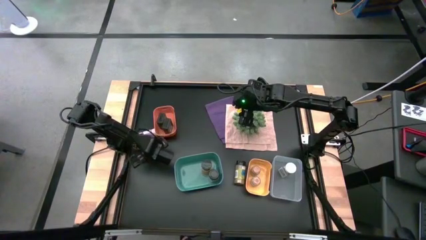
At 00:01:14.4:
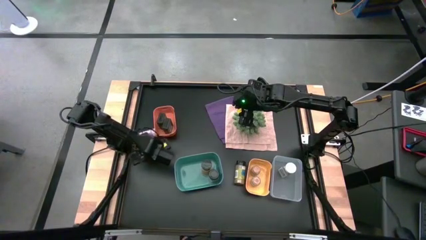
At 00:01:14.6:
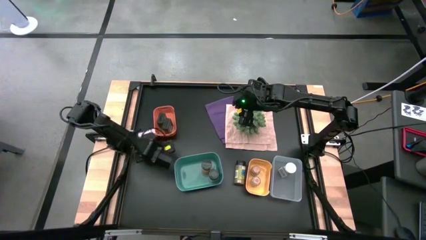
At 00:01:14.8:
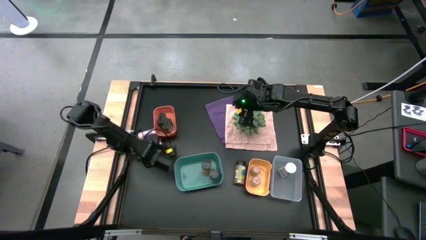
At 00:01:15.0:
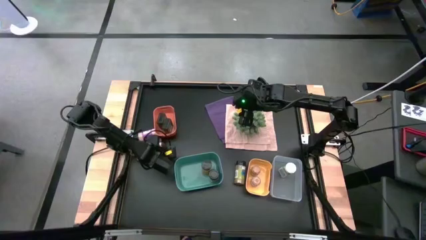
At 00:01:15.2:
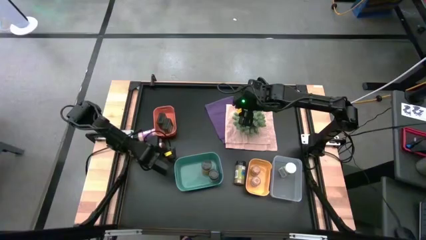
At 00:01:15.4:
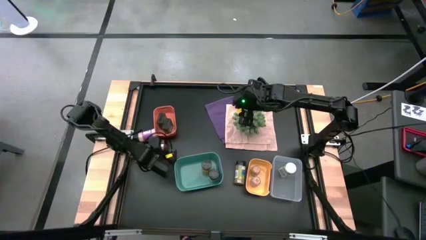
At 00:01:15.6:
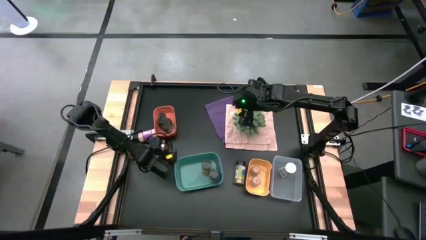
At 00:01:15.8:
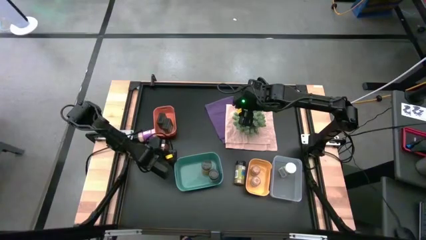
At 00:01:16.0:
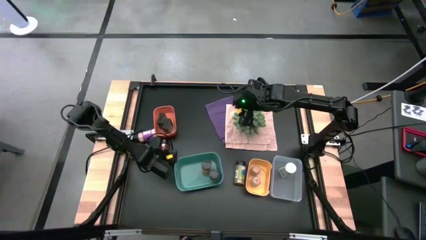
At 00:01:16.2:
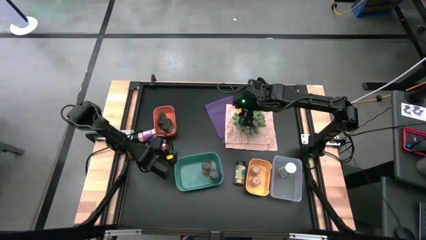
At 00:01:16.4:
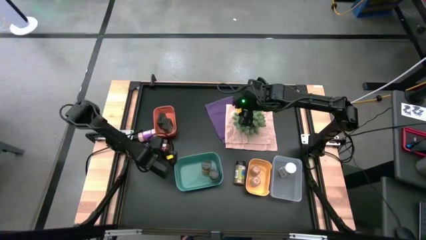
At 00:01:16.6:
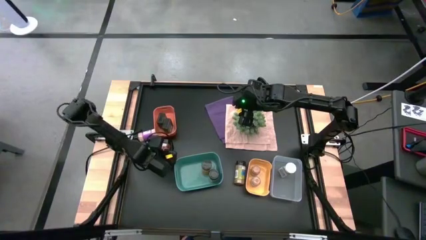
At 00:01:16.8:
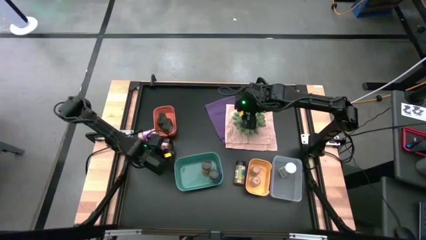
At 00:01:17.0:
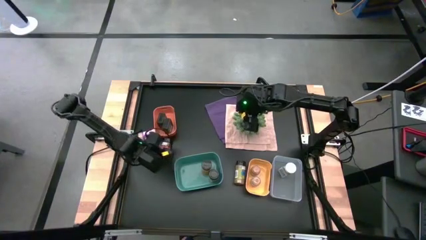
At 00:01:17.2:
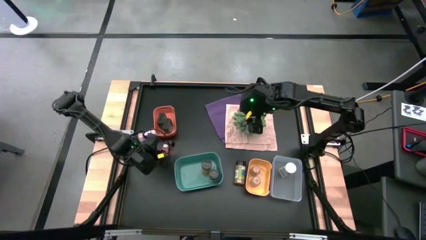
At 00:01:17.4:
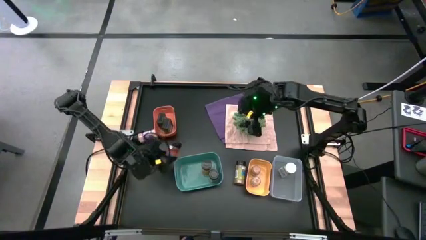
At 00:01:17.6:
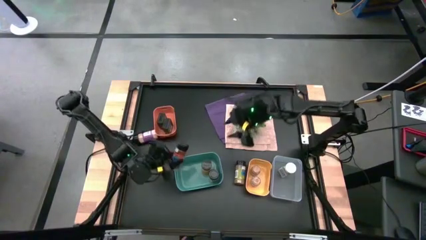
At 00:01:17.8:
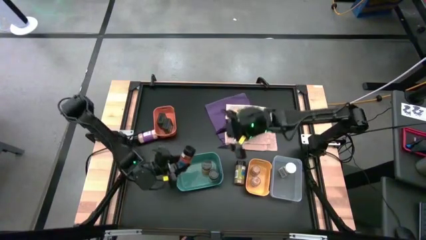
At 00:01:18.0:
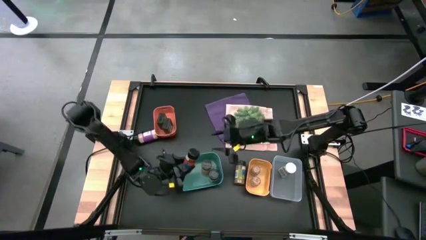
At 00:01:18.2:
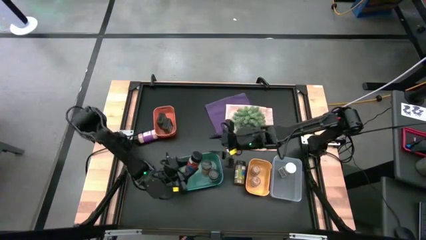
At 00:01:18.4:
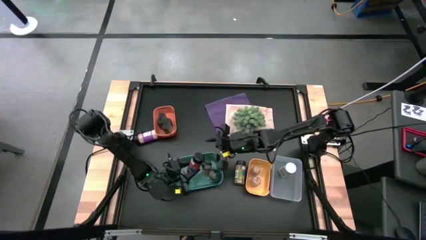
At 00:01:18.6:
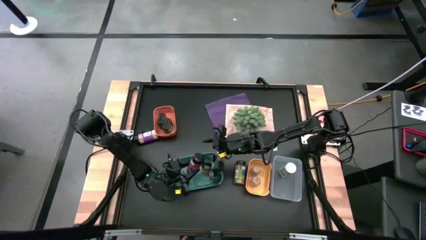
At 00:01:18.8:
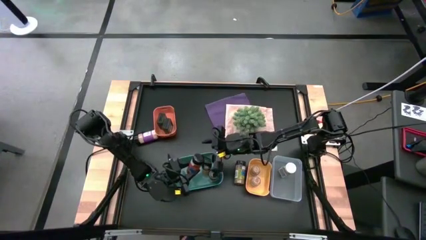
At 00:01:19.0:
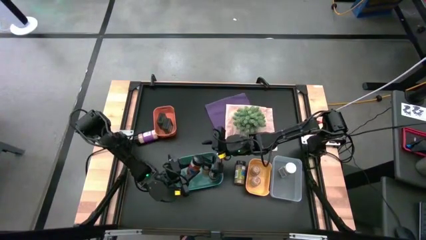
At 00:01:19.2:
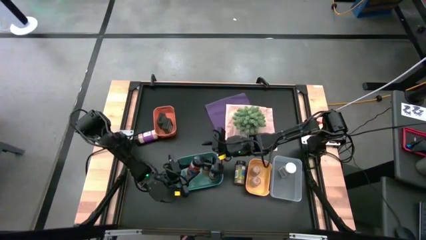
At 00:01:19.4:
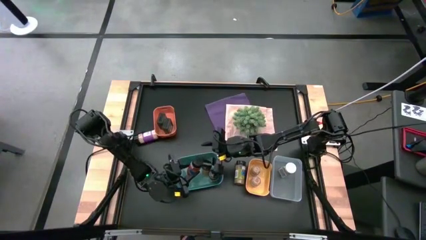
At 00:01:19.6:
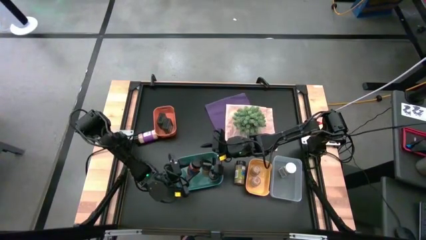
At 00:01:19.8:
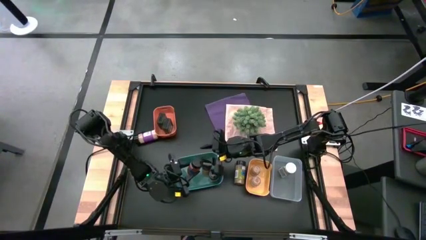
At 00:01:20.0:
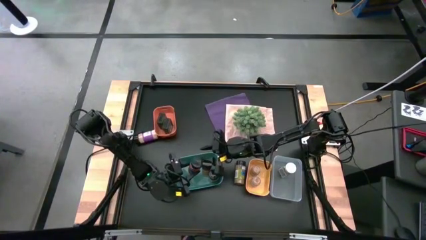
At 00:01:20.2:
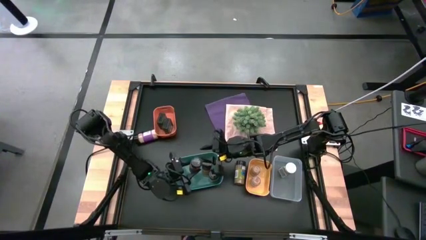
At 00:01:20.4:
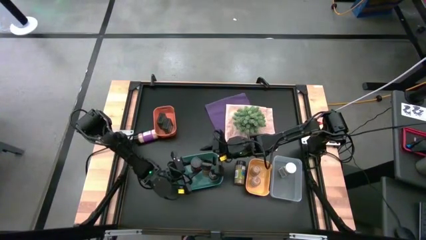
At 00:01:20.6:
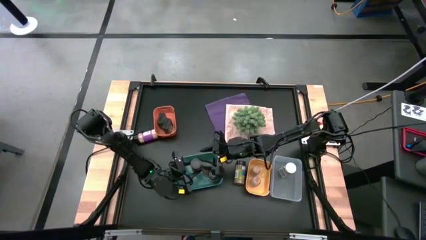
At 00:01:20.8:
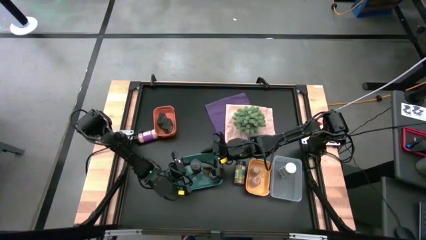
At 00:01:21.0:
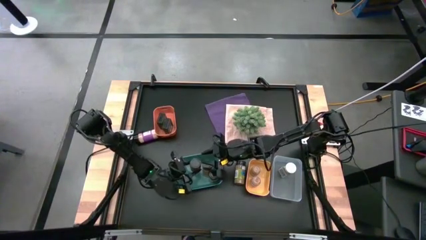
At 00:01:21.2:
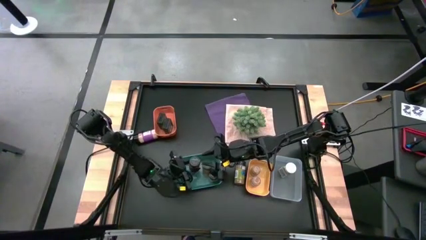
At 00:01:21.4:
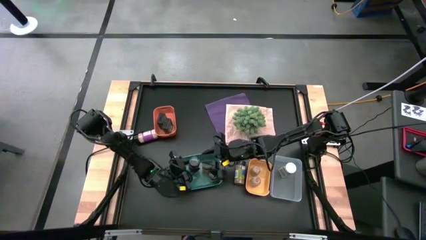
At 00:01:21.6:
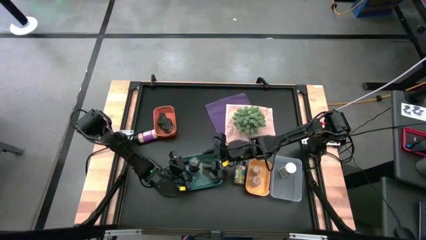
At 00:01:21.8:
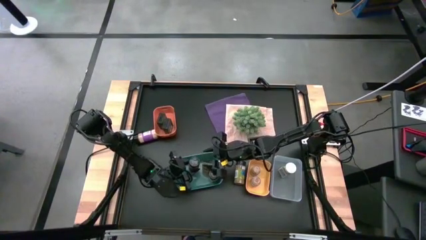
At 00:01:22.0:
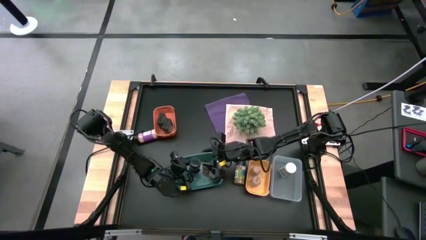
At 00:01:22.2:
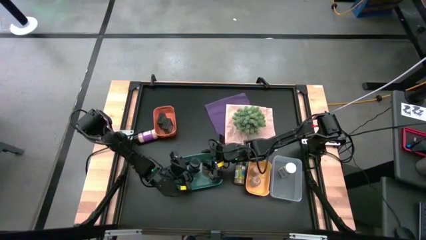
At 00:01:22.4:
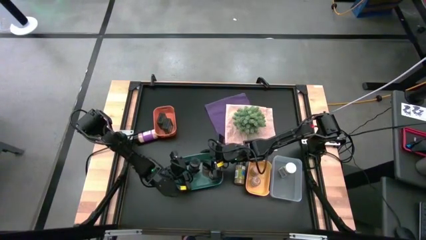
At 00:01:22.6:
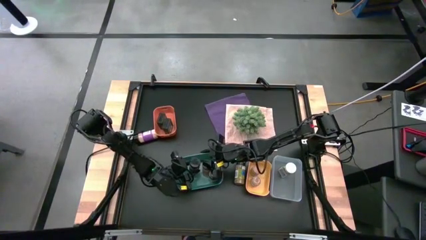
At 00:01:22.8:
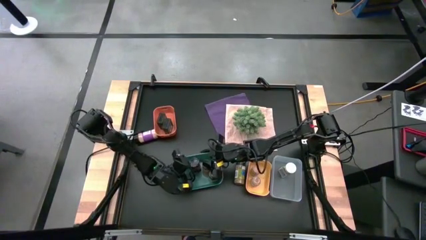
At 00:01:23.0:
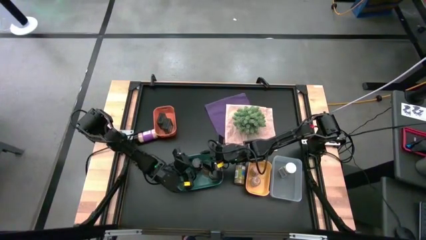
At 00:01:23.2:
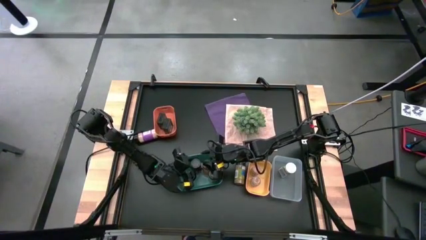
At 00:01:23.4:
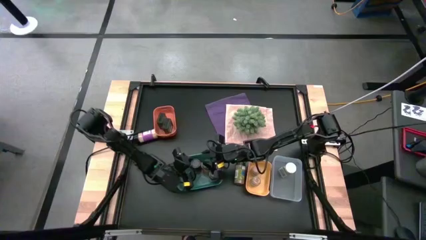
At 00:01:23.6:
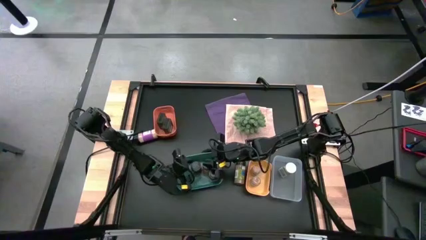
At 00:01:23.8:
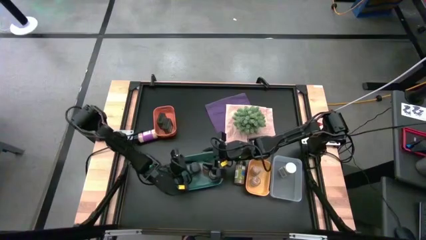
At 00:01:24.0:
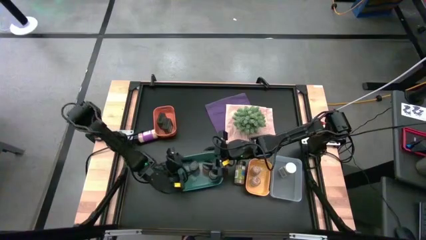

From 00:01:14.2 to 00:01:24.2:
Task: Sort spices by type
Put the orange seasoning bottle into the blue bin

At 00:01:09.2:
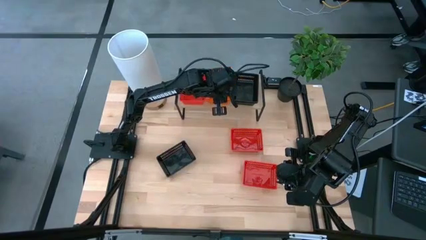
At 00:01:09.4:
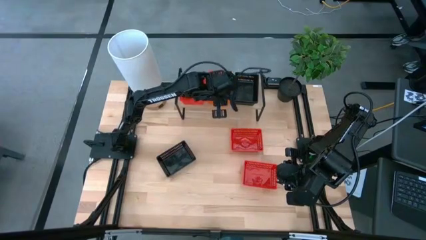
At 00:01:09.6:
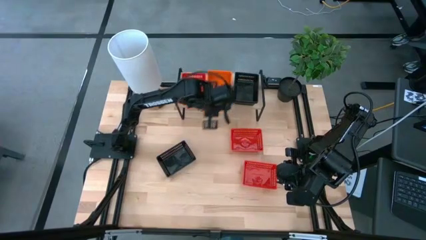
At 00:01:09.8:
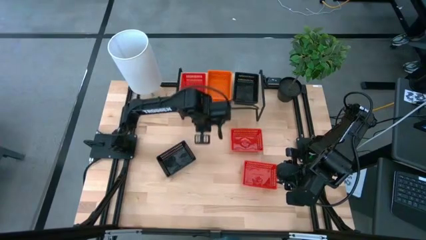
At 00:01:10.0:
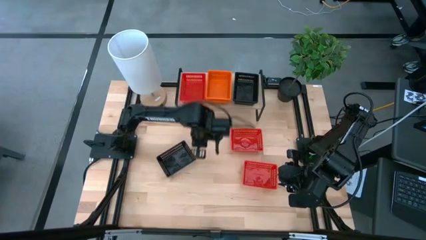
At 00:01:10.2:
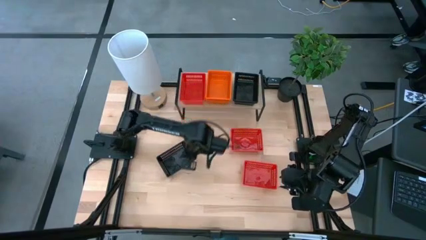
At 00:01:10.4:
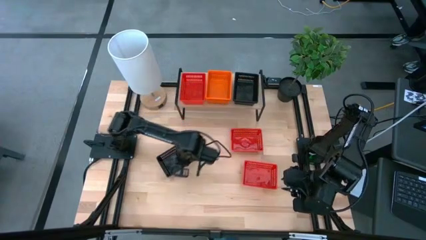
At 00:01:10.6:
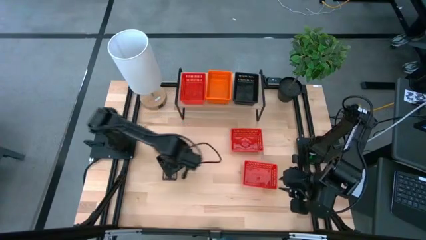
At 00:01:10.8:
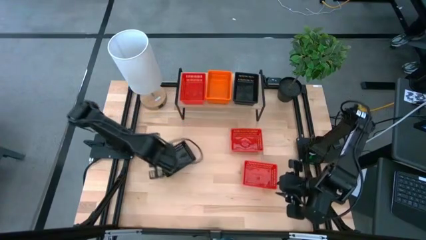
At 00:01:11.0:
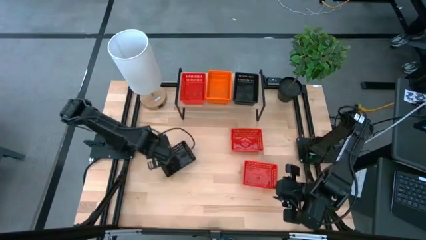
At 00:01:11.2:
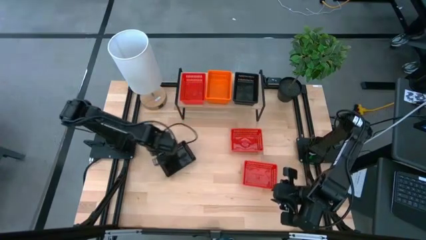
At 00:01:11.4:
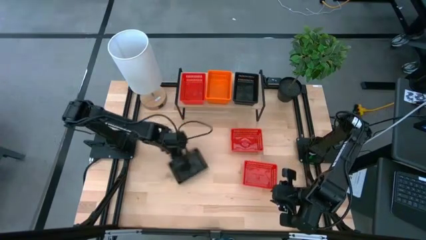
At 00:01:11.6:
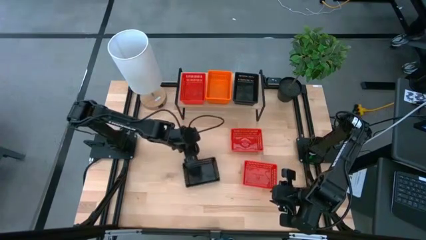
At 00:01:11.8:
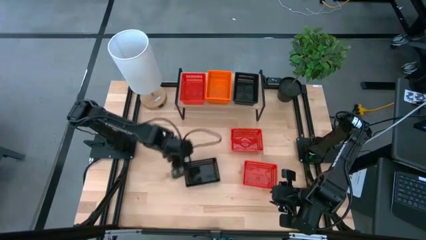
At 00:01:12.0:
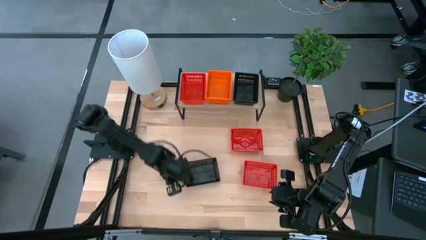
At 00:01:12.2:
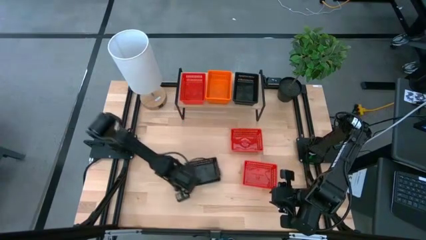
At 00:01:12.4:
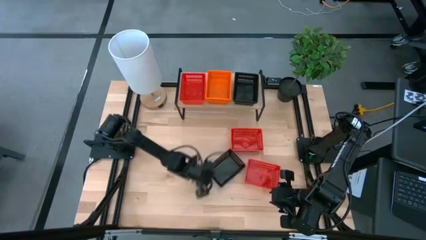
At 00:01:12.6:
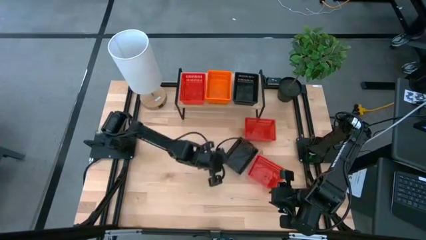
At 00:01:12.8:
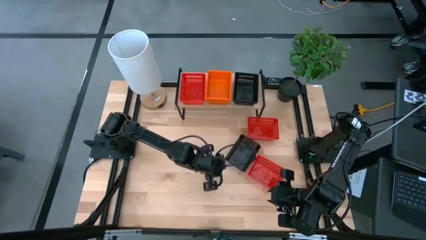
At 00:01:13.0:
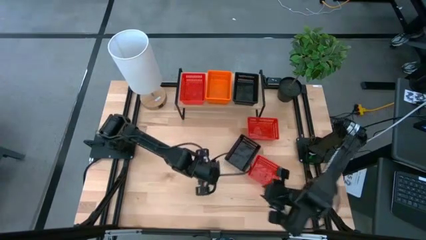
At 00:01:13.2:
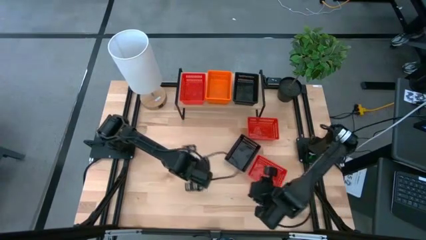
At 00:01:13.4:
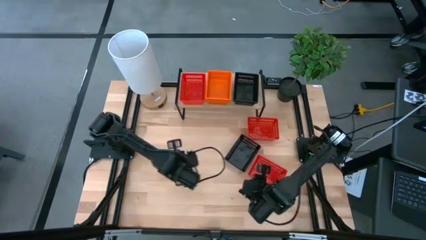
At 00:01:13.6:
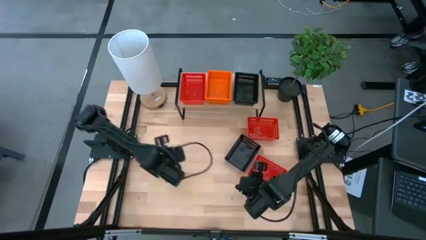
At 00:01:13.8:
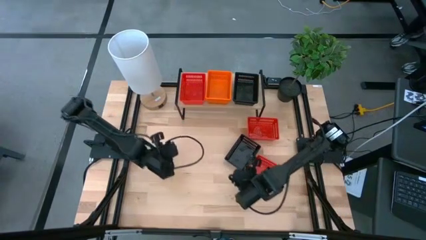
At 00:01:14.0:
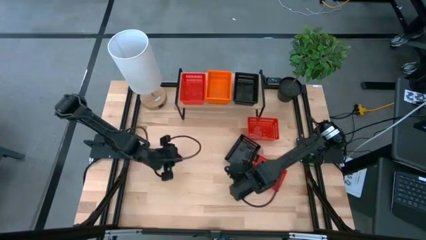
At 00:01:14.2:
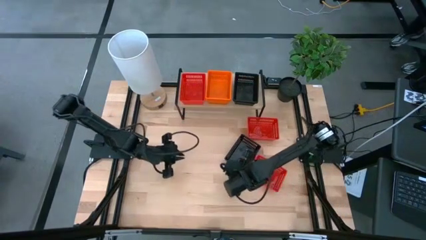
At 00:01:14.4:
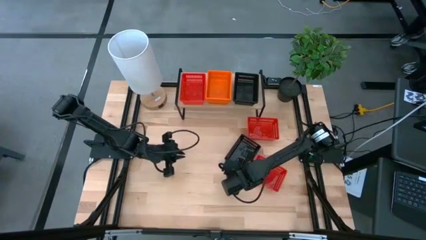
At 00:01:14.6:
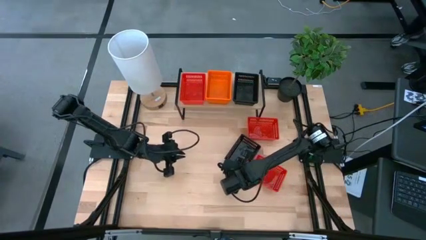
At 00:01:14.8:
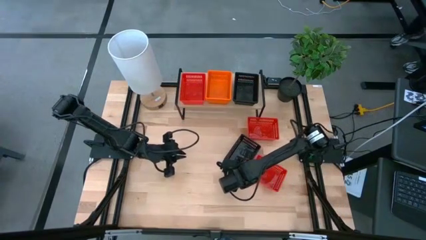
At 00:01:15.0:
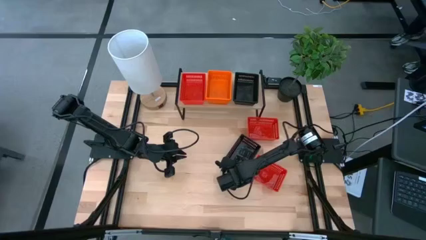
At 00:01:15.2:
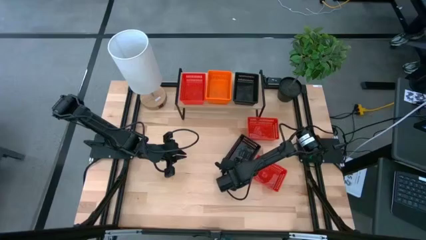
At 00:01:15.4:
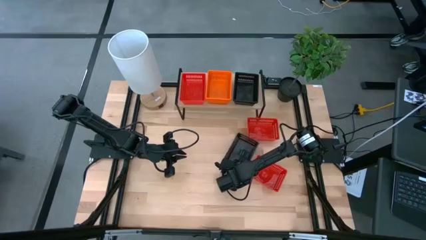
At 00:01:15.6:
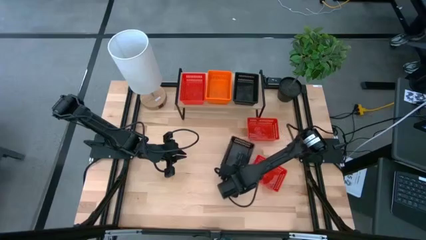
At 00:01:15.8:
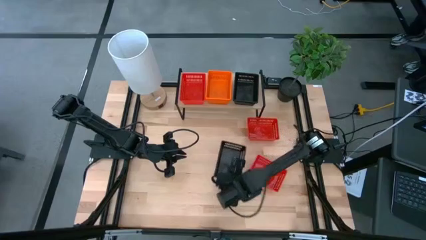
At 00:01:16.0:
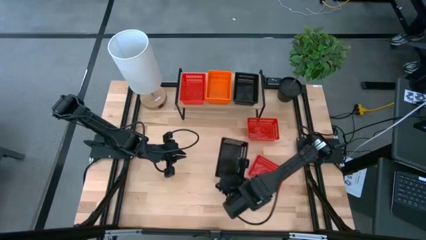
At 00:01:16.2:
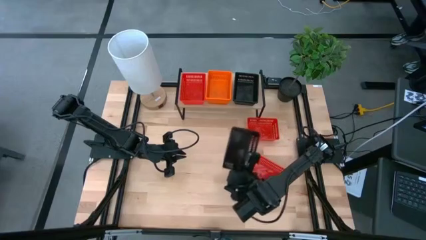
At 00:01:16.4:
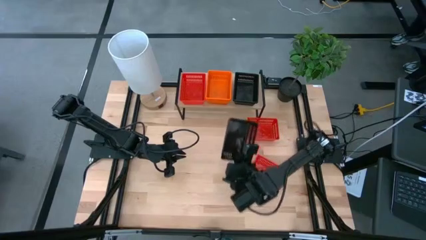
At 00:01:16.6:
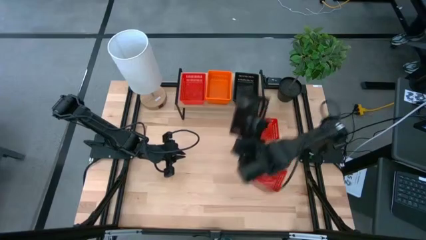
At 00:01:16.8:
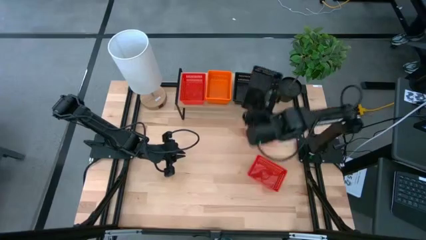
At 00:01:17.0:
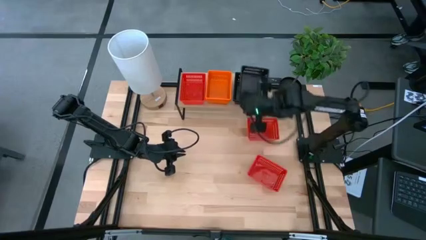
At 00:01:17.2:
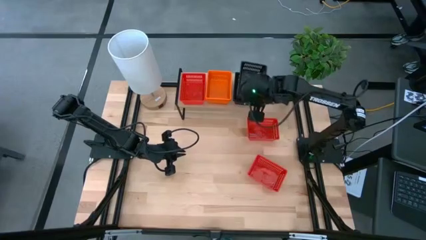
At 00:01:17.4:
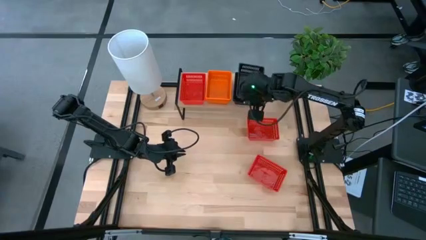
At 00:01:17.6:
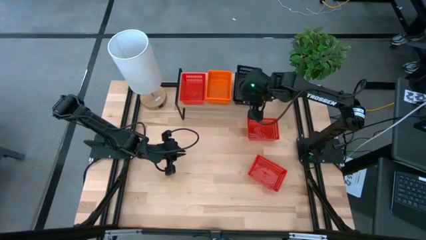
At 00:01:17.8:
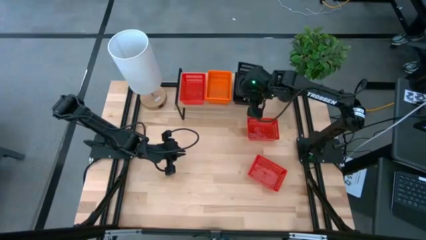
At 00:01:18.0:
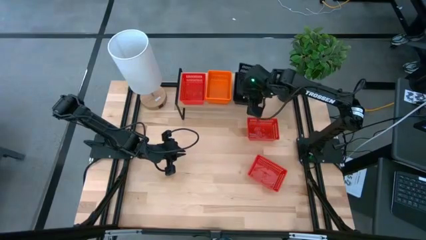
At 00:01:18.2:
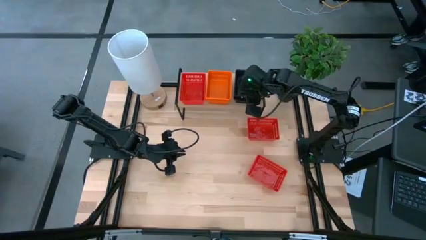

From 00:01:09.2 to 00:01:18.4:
Task: Stack baskets on shelf by color
Stack the black basket on the stacked black baskets on the shelf
